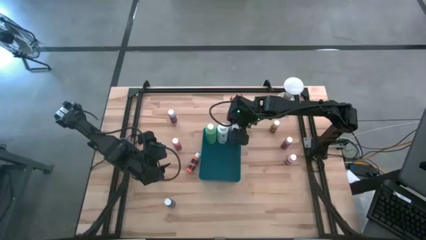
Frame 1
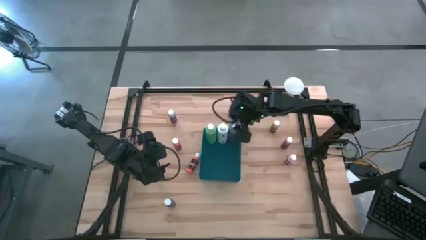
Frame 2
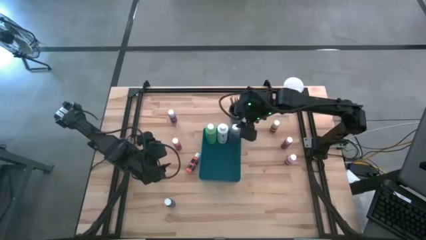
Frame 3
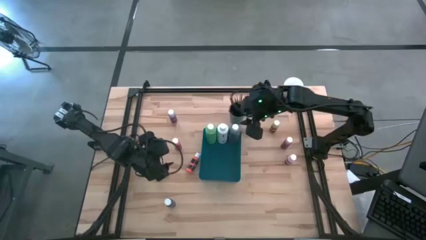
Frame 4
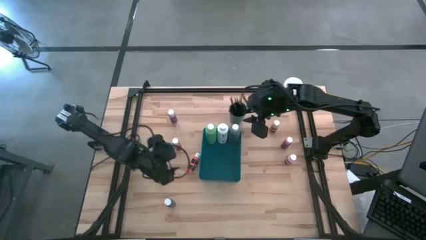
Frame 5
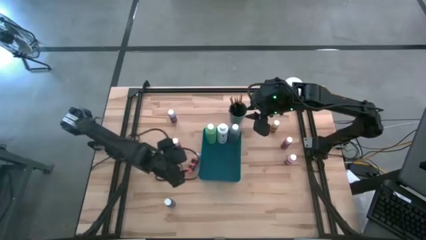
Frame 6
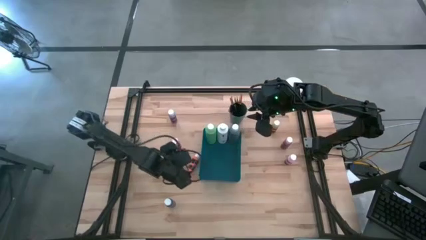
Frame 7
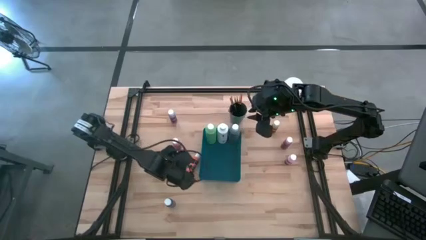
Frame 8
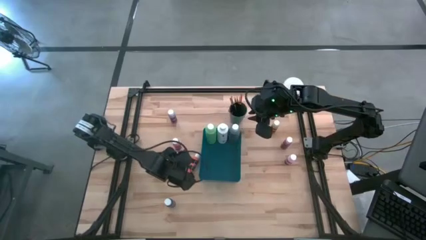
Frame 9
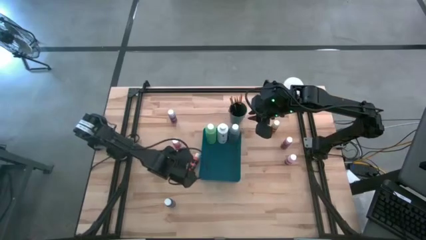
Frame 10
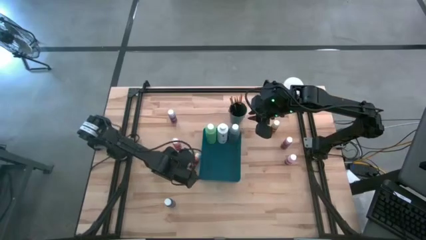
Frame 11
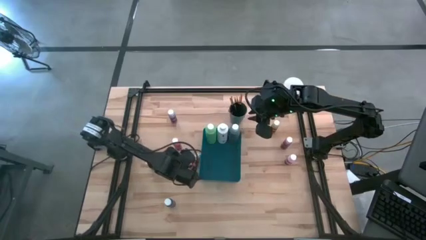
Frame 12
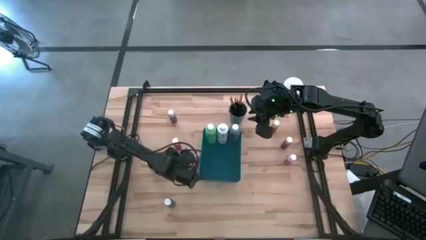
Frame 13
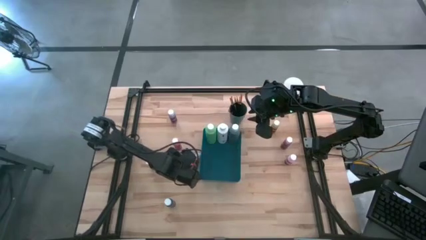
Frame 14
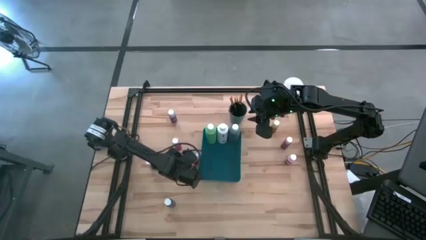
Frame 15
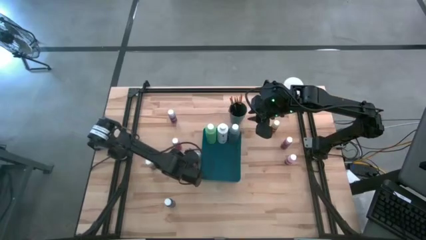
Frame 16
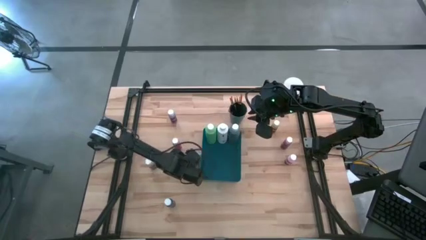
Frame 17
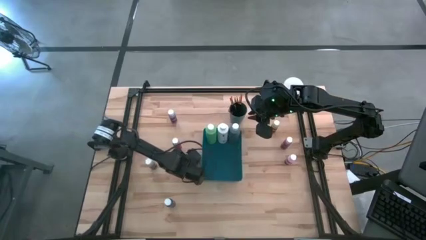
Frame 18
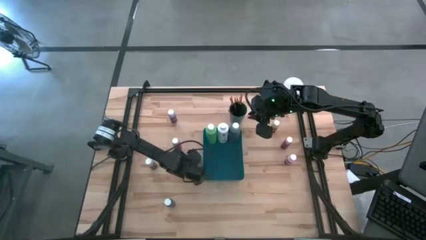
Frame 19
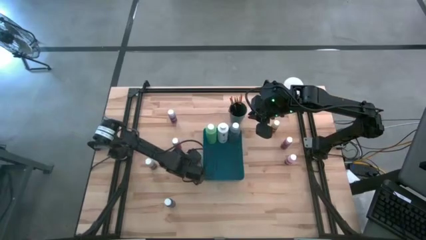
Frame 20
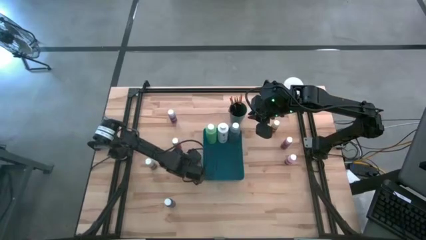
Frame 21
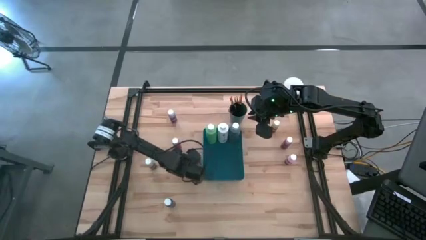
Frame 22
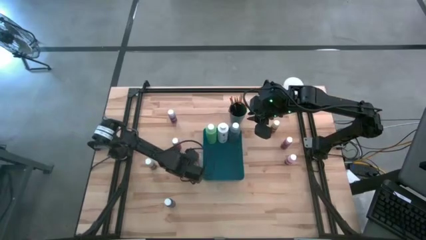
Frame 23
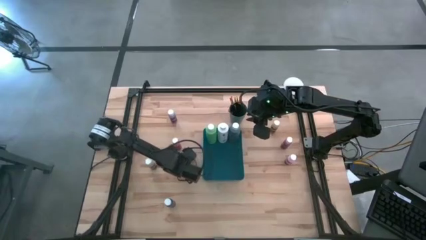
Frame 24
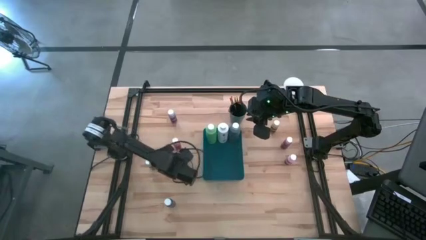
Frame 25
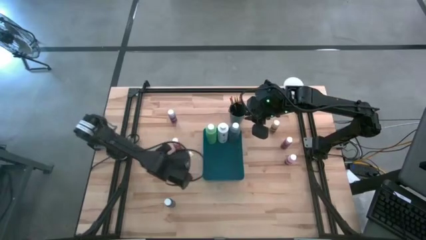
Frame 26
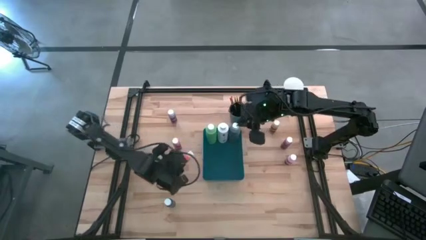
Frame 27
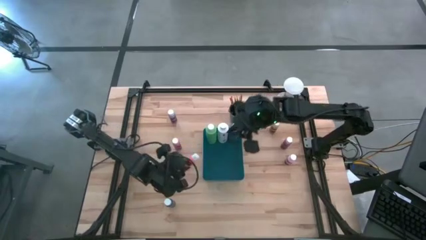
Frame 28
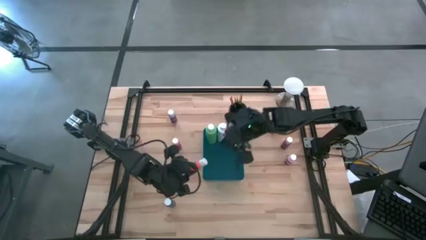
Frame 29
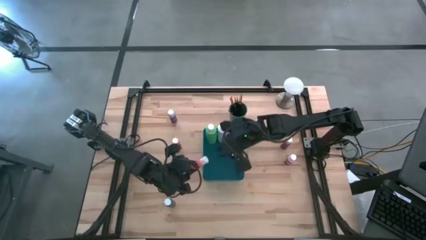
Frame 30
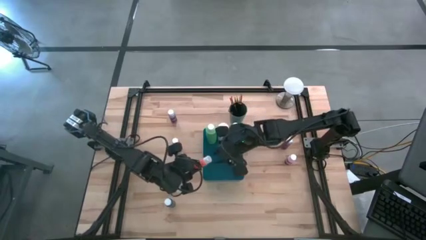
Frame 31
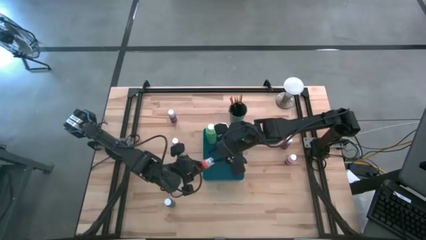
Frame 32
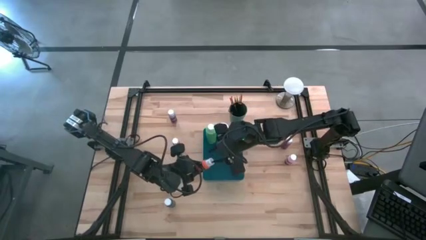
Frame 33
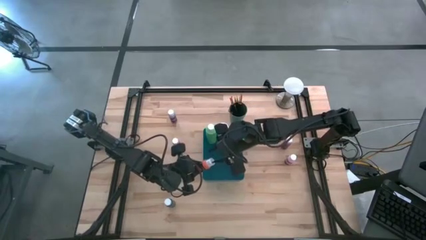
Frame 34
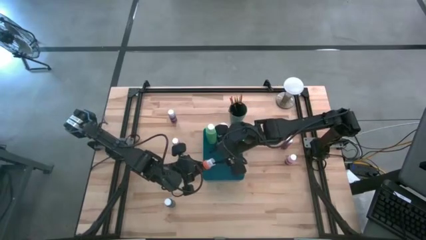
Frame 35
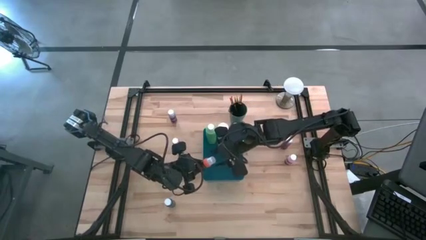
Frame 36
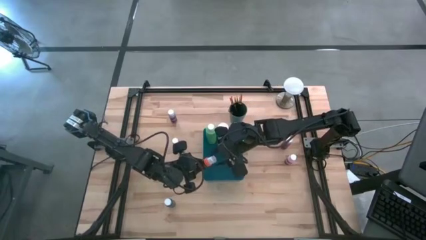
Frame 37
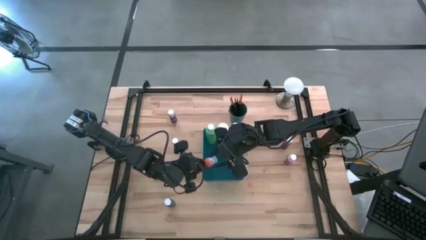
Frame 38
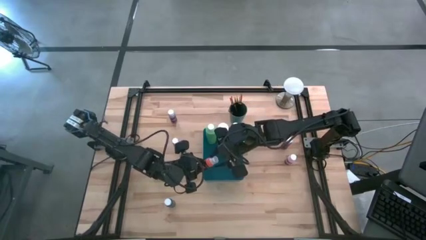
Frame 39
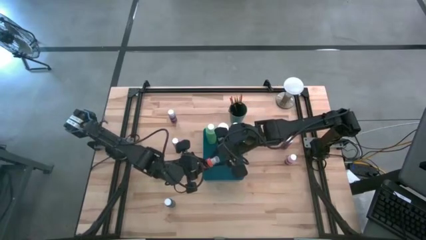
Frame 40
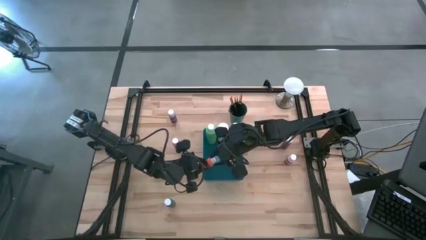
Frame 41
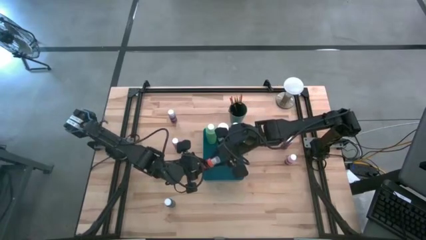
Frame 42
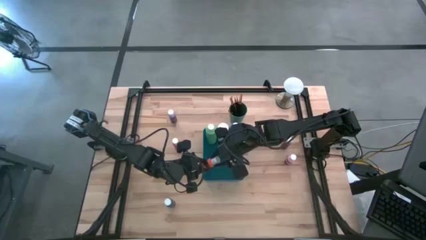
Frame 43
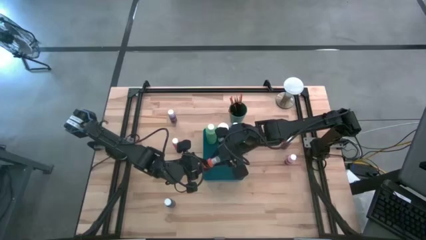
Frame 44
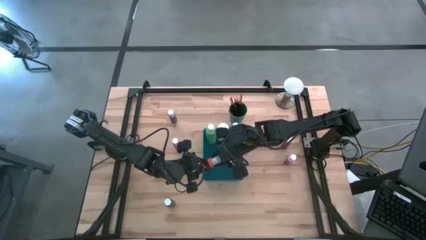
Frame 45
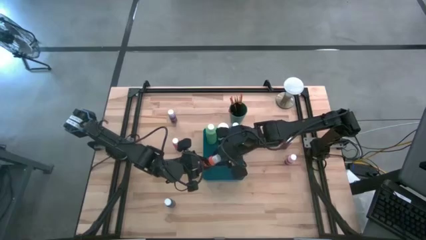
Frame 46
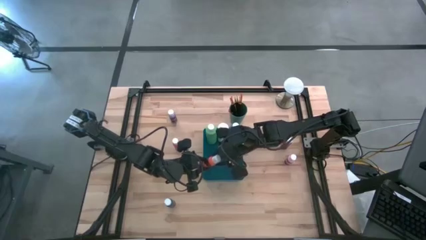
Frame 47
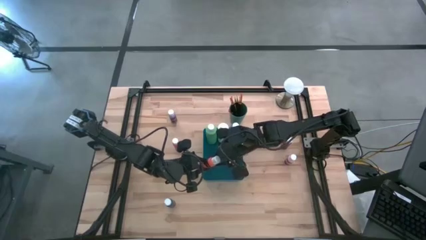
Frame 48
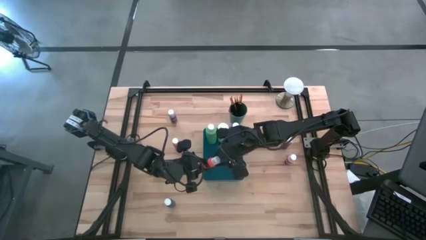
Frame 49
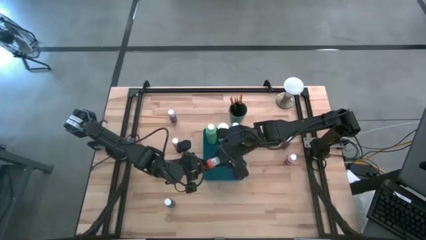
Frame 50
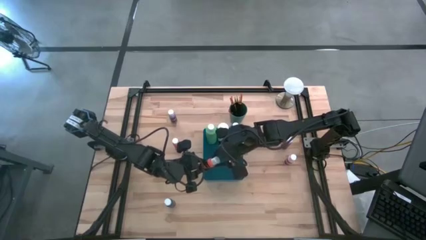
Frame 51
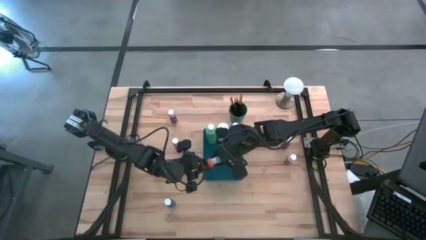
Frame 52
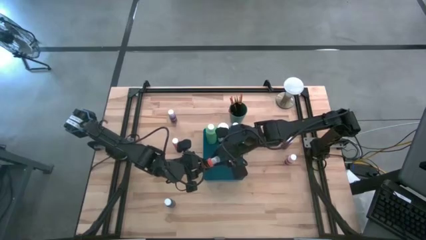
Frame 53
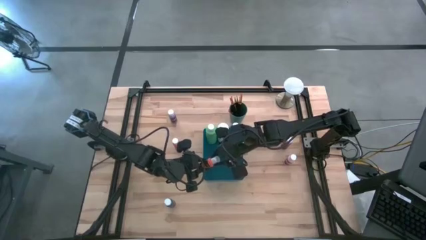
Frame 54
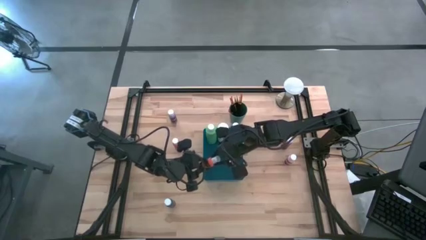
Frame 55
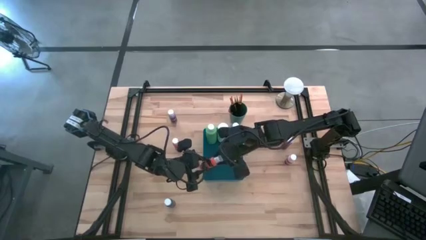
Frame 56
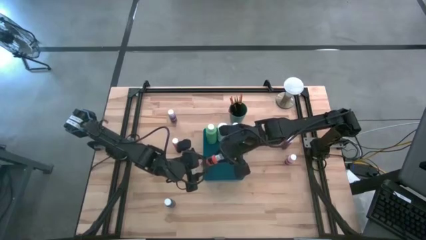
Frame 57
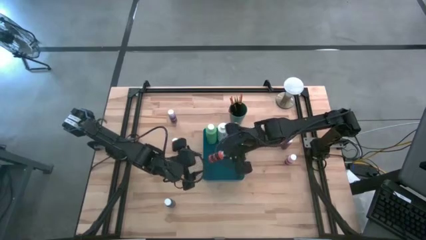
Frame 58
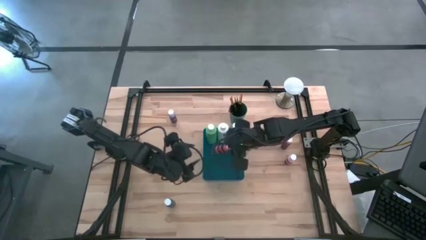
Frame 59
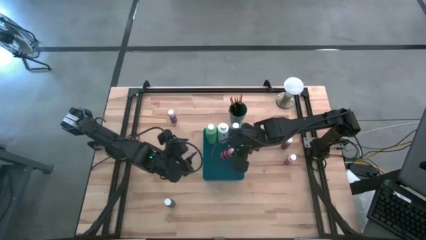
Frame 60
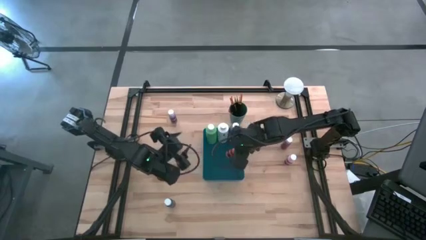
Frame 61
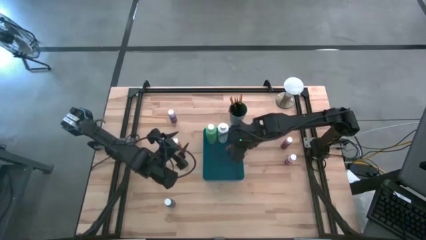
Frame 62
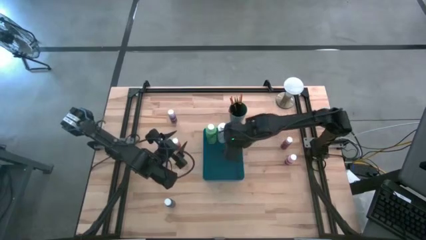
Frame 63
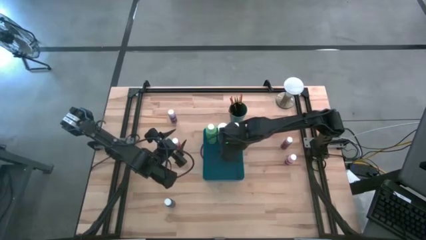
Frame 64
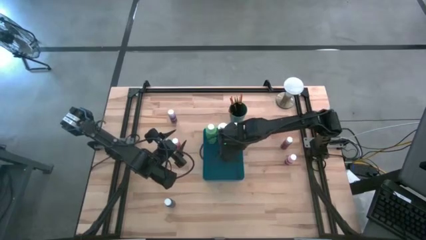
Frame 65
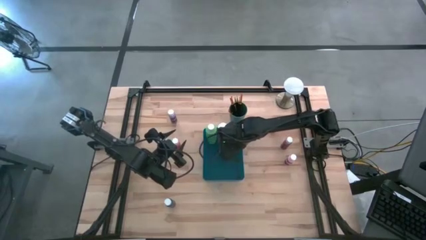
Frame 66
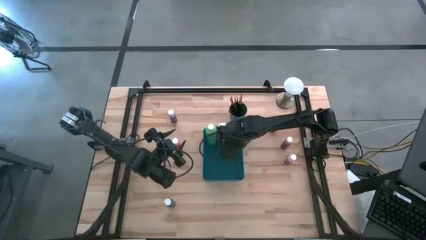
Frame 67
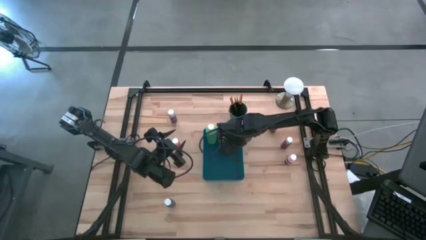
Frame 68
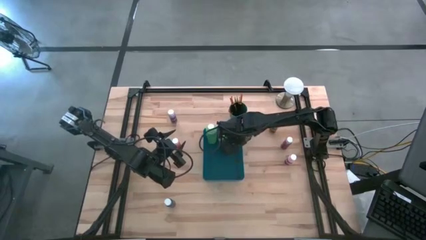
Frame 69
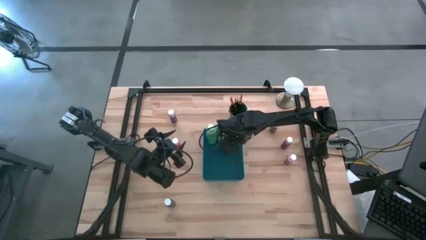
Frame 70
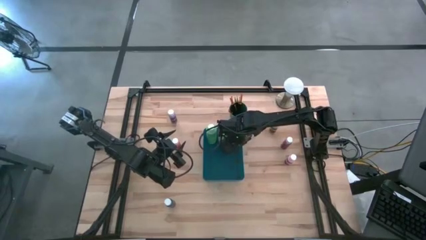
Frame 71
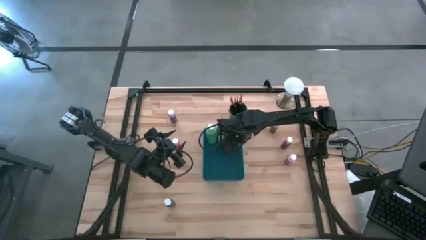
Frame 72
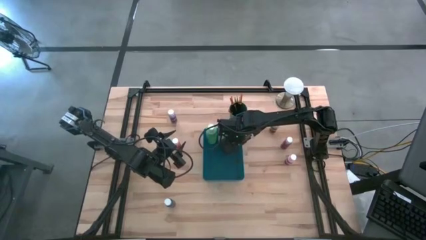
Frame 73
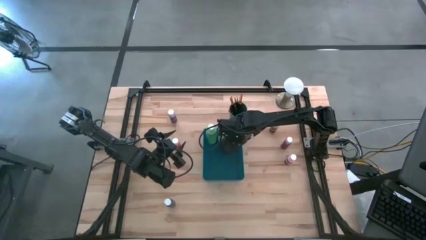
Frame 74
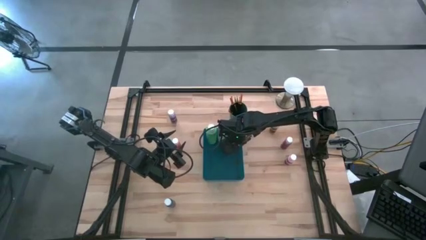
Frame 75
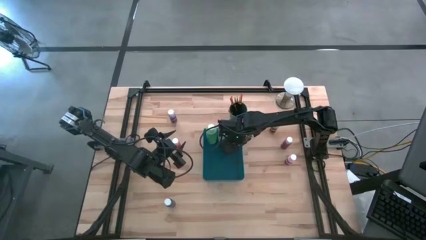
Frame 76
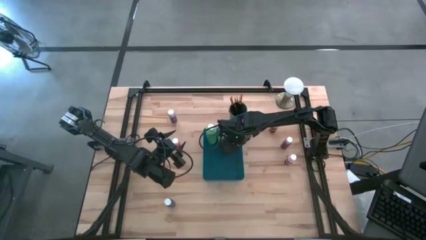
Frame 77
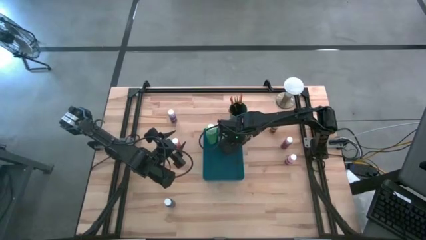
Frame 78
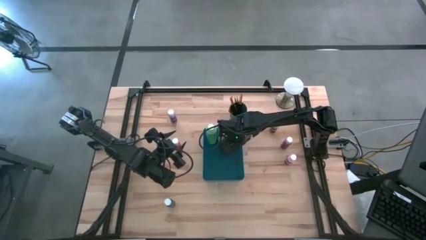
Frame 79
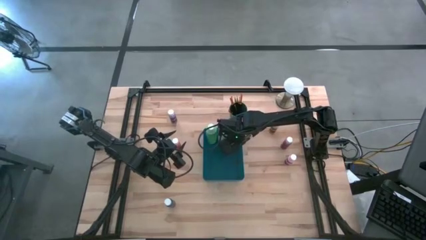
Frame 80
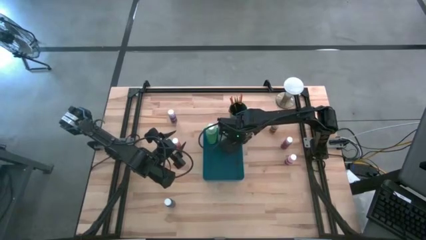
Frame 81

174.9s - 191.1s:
Task: Pick & Place Paint Supplies
Put the small orange paint bottle into the blue bin

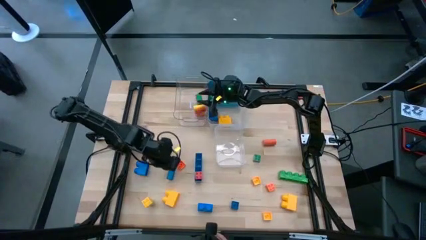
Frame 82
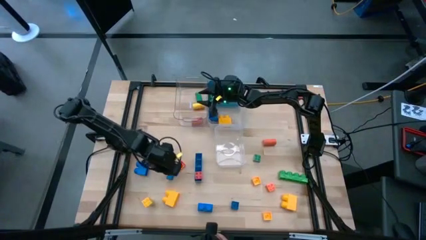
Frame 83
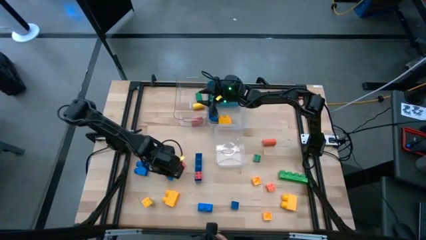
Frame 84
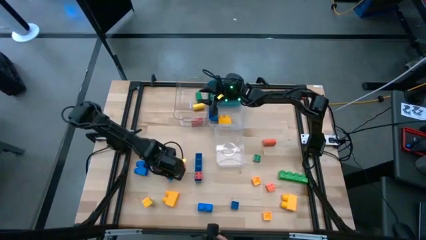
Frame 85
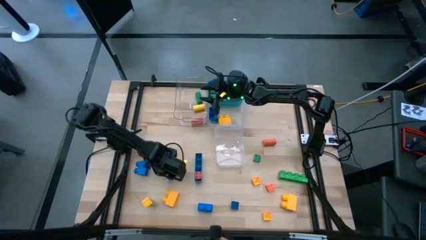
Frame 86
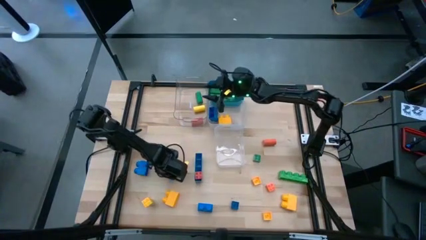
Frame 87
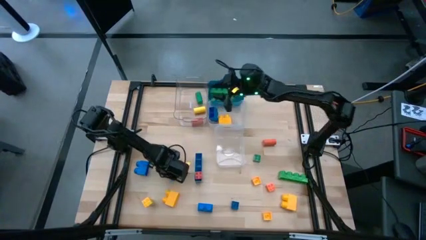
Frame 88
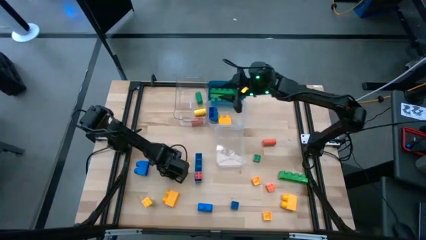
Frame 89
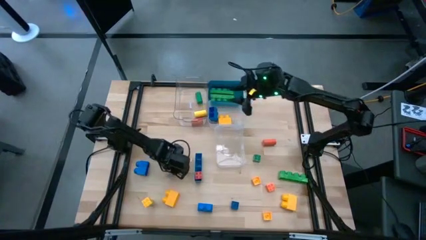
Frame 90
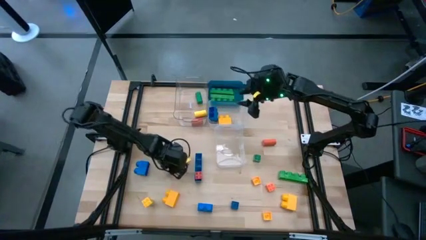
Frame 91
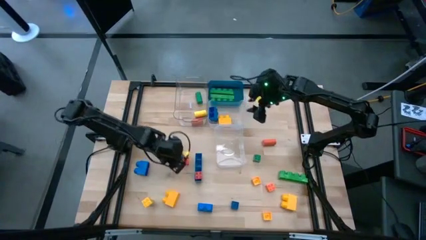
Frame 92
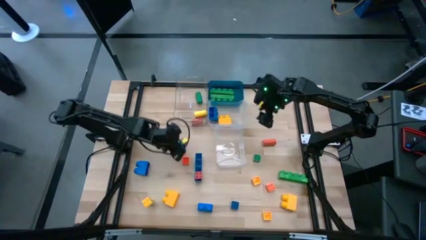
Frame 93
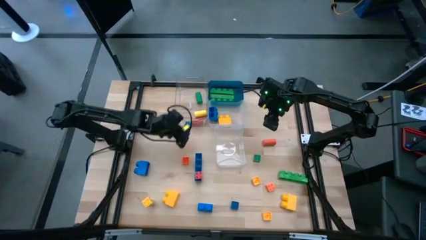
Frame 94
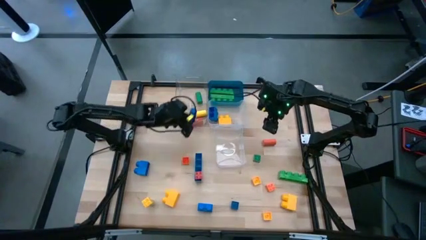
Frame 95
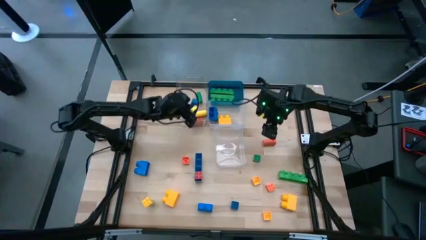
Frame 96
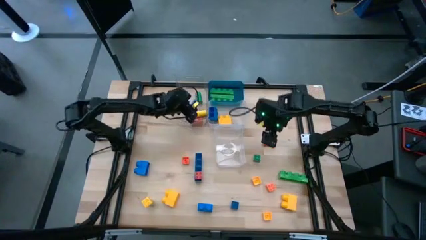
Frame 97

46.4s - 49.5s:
Task: Sort blocks by size
Put the blue cylindrical block into the top left transparent bin
